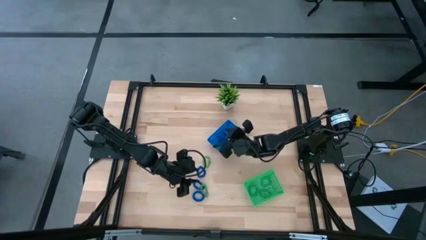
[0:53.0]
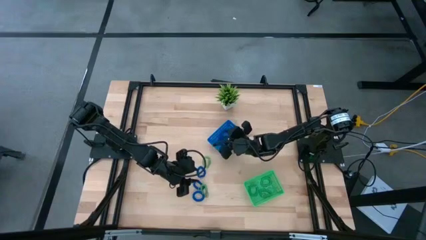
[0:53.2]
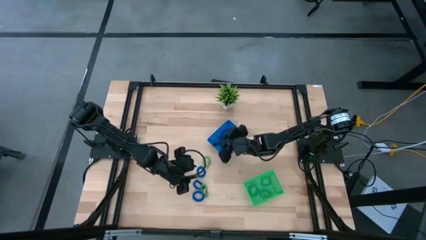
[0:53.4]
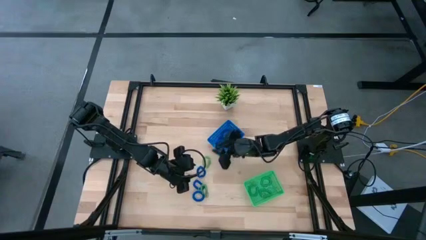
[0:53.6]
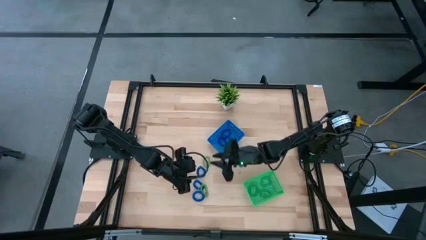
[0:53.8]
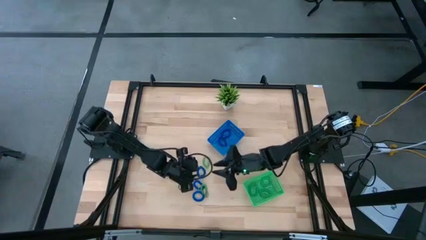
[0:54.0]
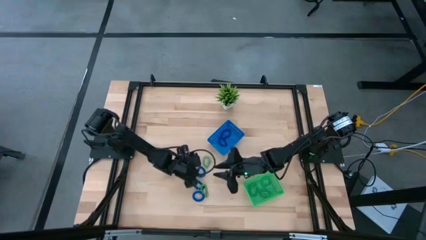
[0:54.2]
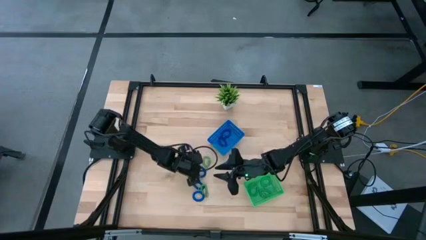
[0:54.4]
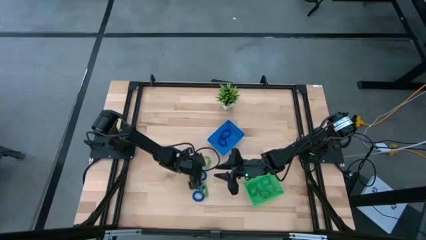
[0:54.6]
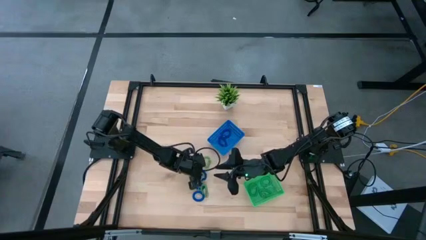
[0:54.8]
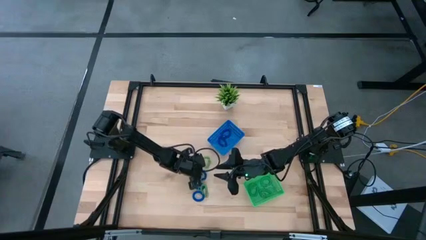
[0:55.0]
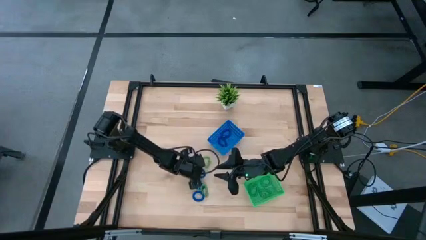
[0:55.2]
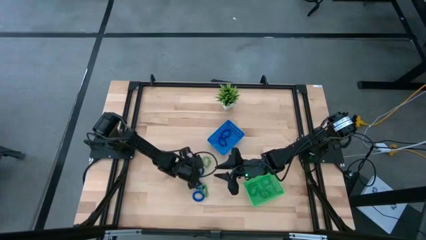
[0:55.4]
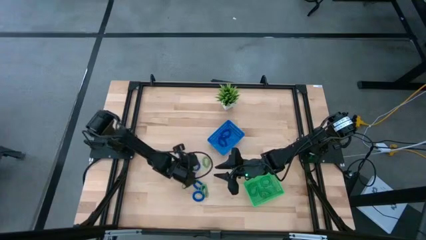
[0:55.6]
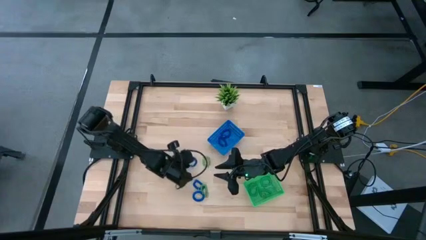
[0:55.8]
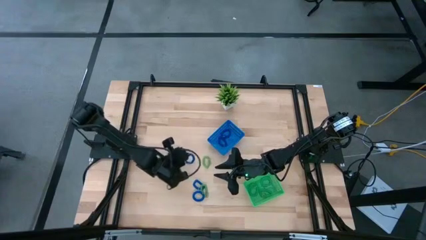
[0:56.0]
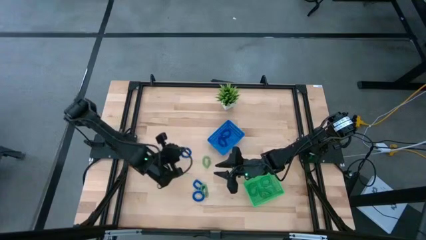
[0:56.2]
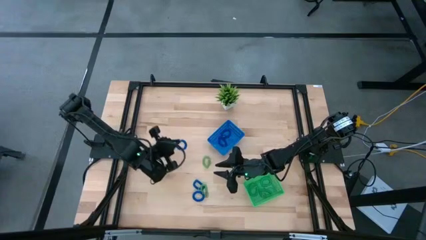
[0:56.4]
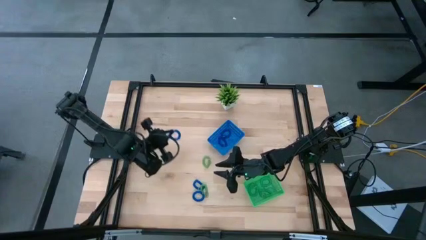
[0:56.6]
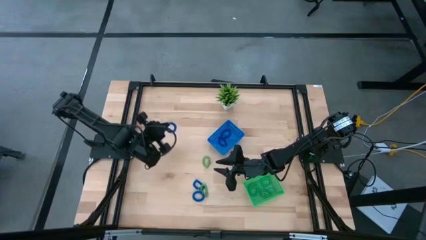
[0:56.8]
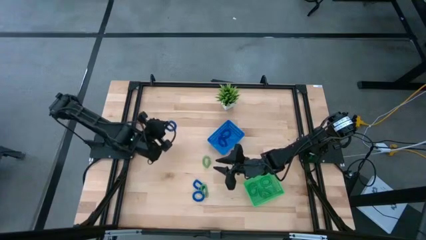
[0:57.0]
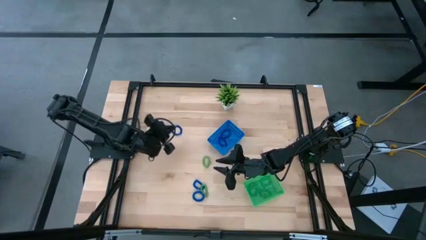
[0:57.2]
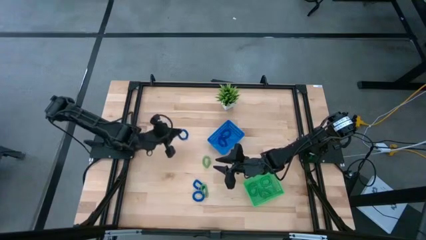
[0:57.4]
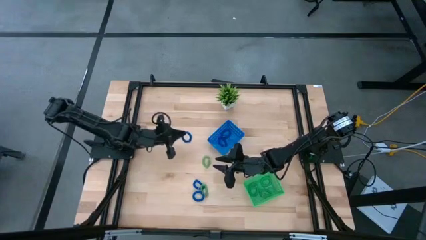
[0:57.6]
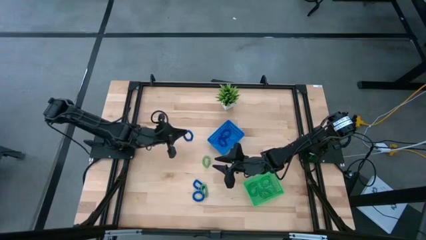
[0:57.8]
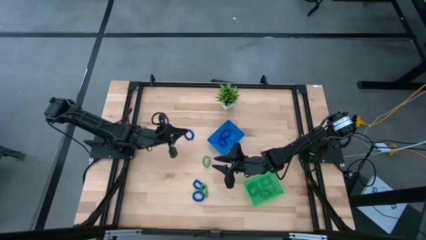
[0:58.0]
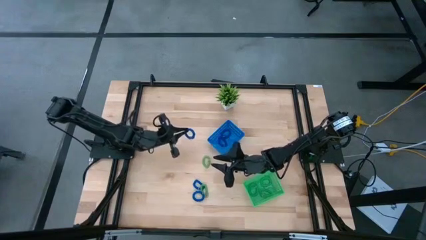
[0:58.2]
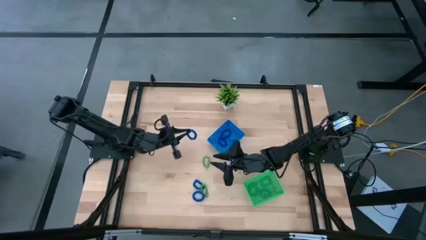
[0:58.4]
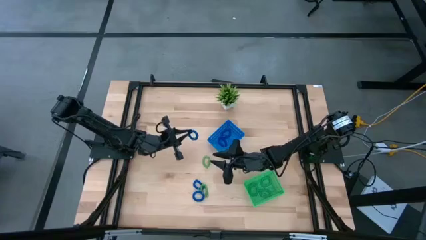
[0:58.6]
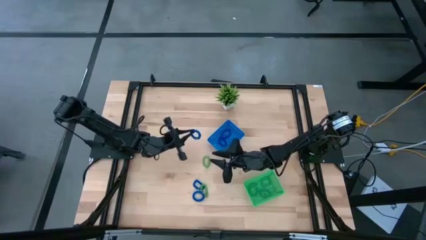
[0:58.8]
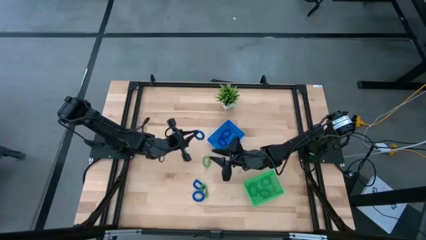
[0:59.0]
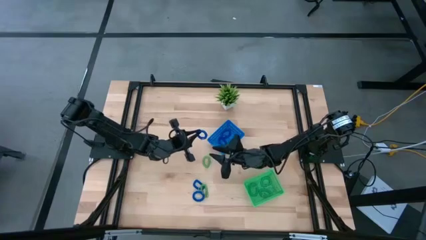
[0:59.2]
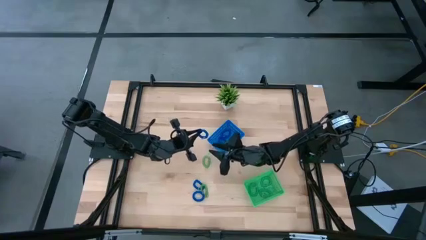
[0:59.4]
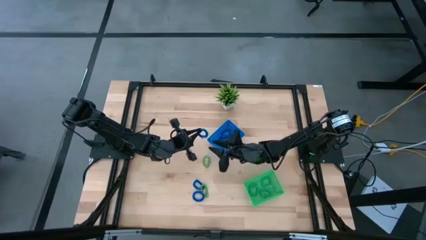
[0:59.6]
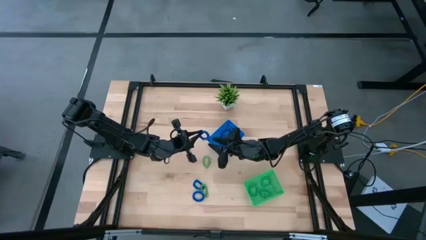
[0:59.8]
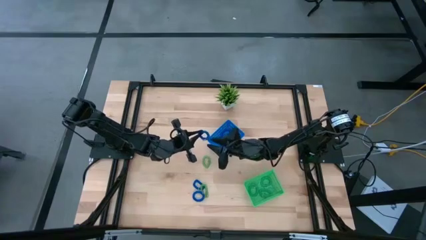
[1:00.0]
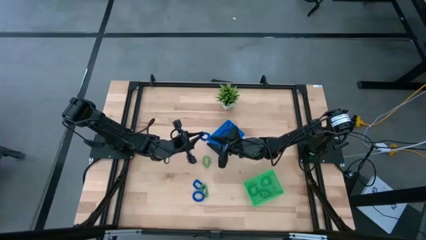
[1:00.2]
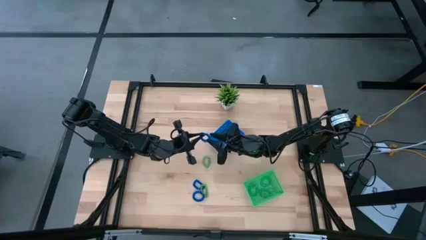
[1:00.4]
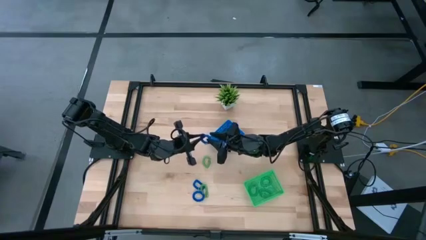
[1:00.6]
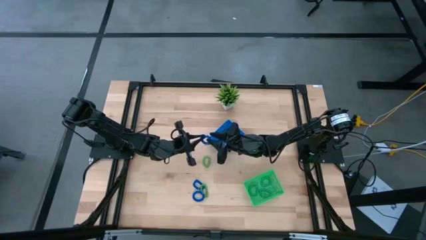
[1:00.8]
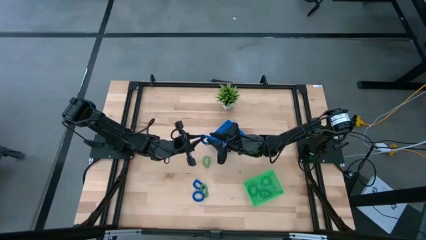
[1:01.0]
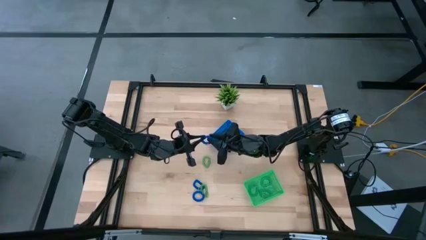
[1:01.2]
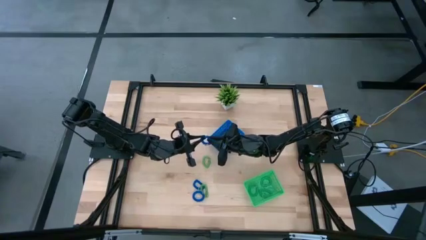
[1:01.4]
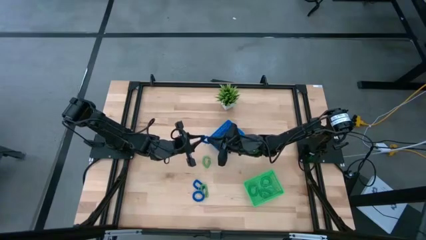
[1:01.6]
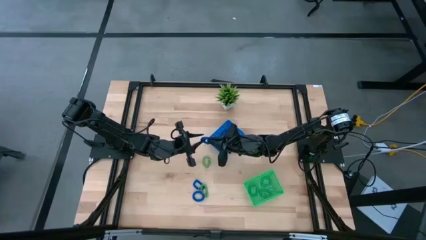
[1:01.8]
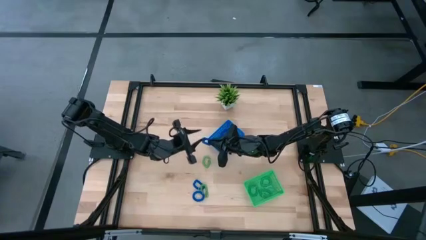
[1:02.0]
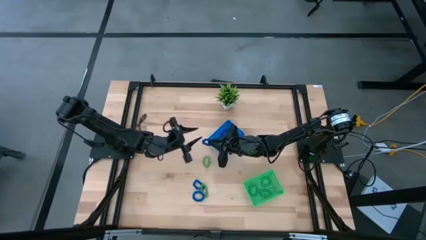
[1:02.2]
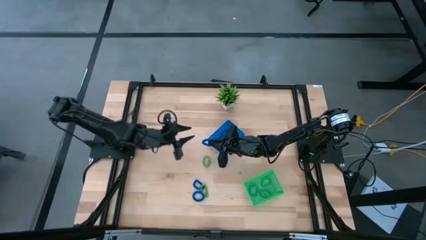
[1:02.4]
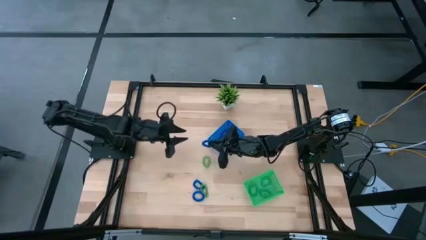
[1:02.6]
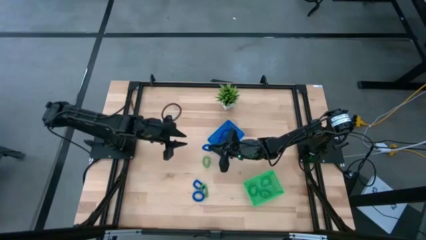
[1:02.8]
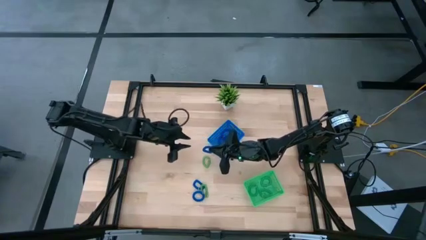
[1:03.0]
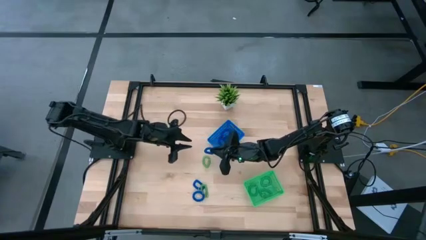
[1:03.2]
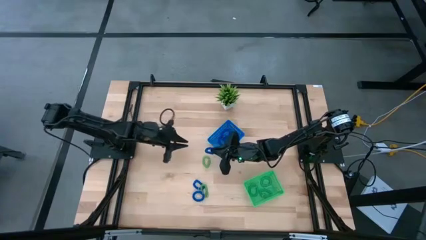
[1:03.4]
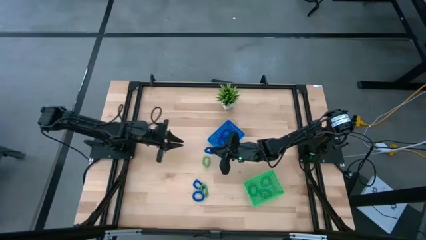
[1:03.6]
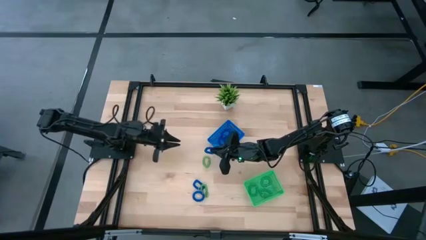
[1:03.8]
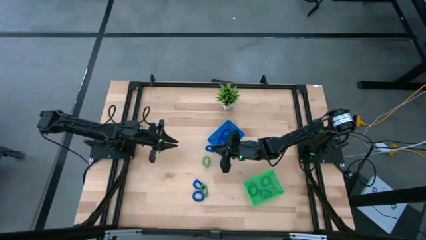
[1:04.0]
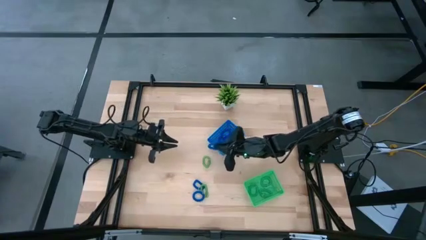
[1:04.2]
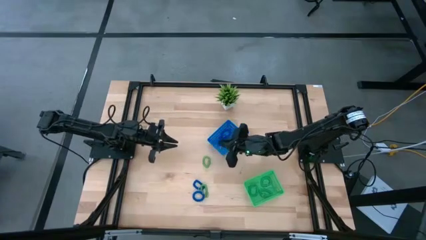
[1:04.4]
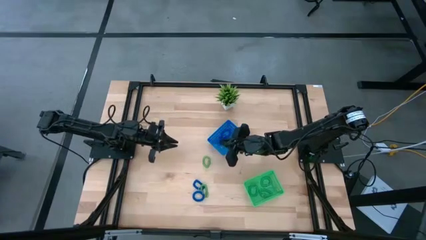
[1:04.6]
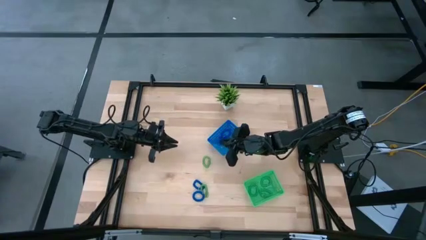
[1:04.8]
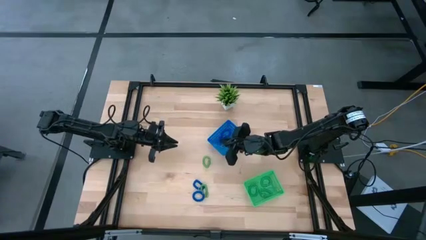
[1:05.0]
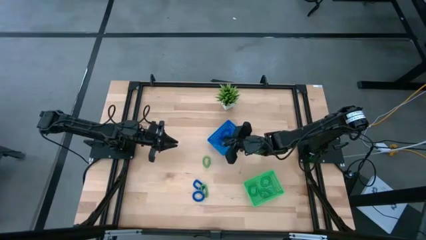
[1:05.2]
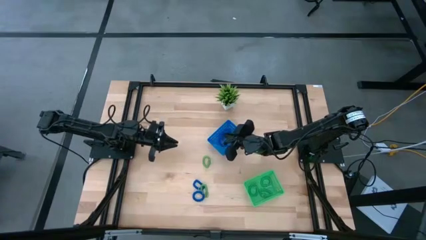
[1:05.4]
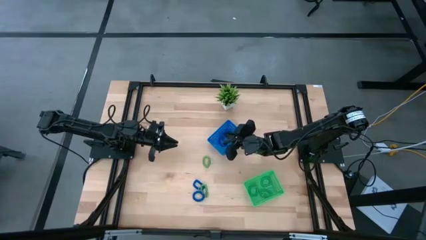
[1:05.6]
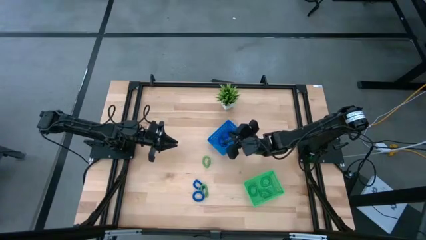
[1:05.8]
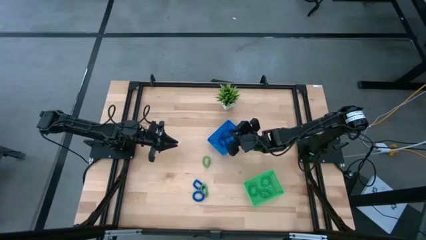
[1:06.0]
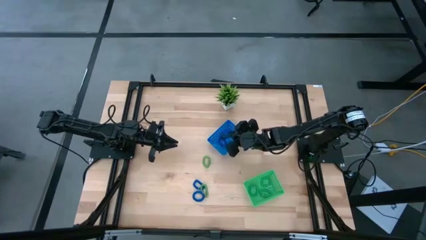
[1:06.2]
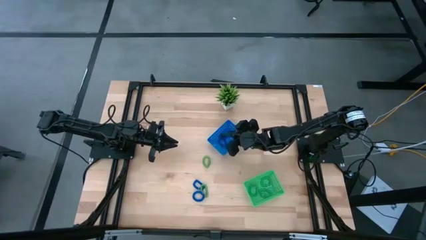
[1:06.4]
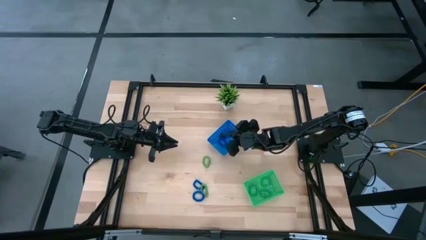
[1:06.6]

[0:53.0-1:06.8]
Task: Sort spring keychains
Put the blue spring keychain into the blue bin
